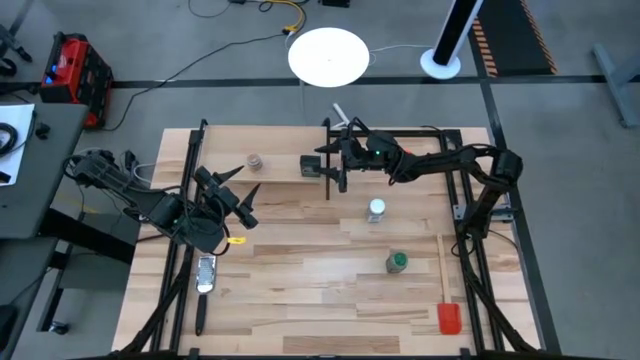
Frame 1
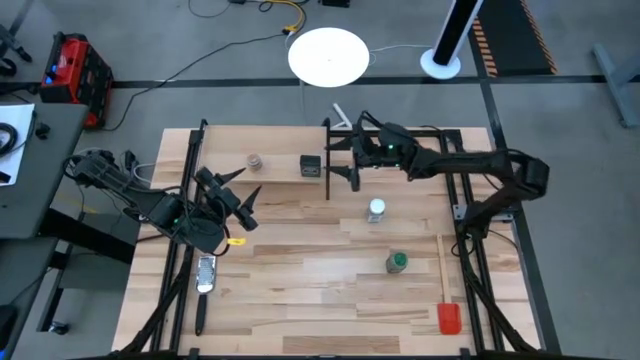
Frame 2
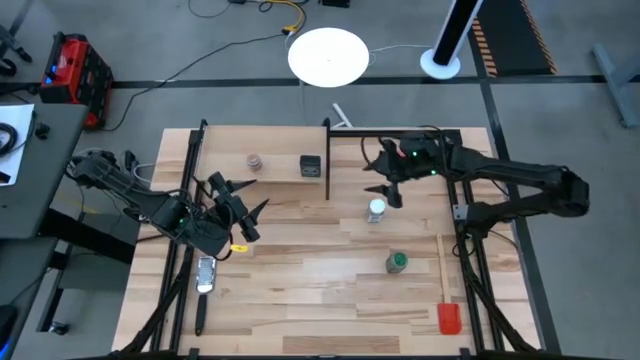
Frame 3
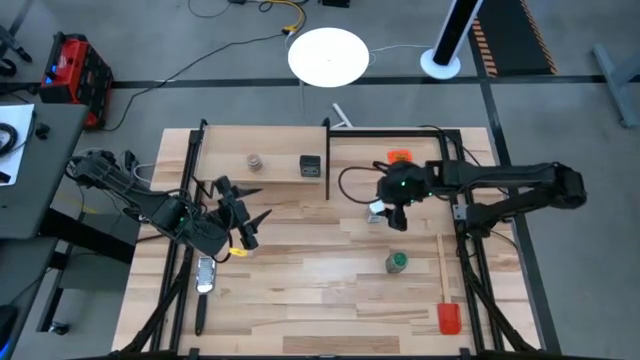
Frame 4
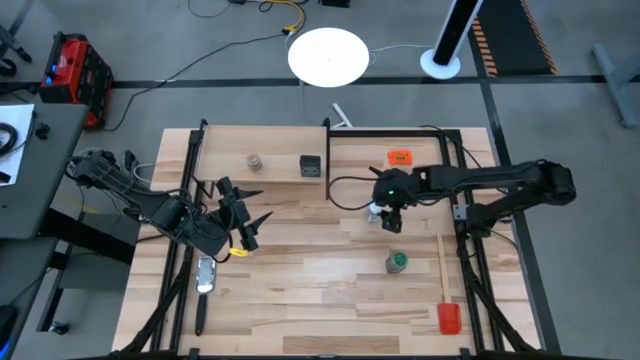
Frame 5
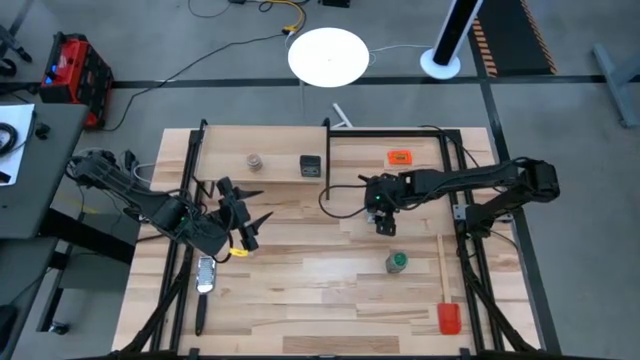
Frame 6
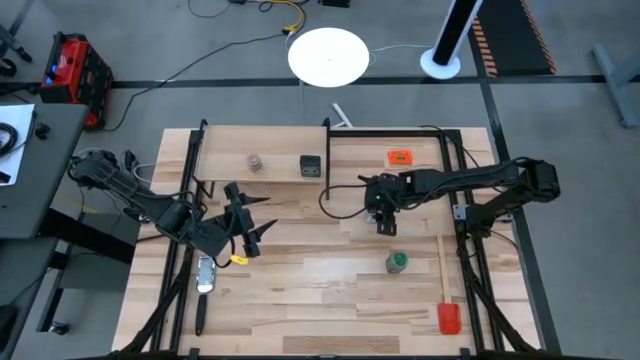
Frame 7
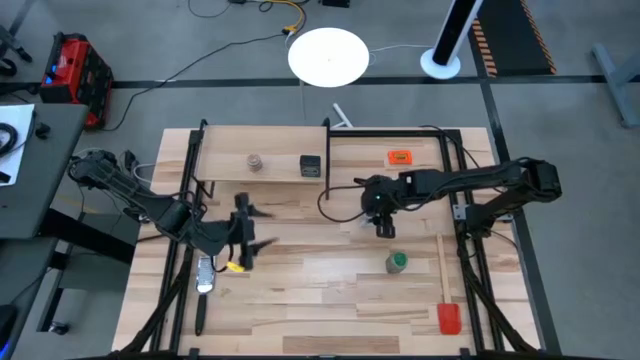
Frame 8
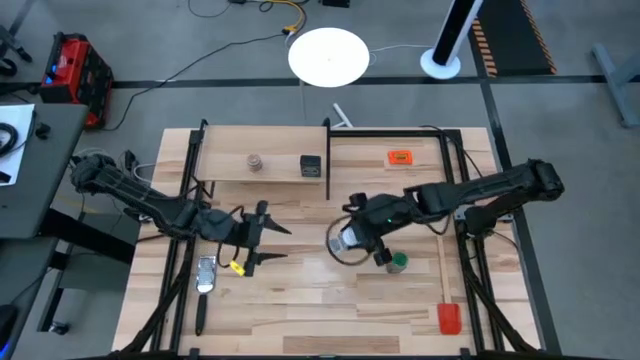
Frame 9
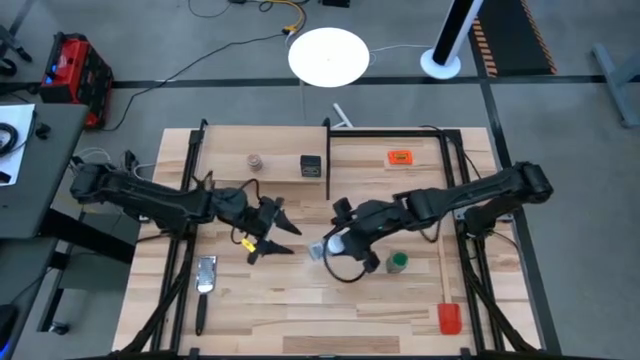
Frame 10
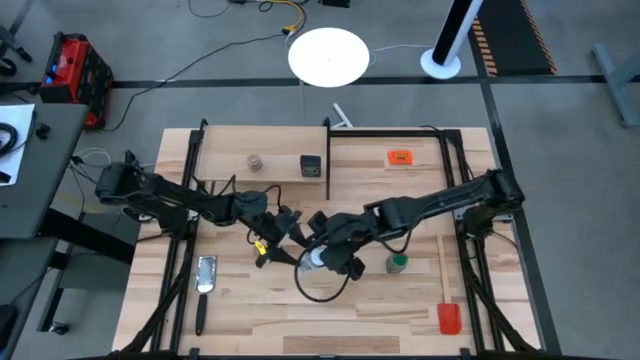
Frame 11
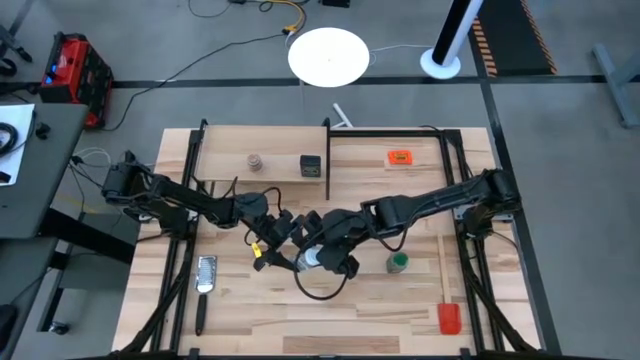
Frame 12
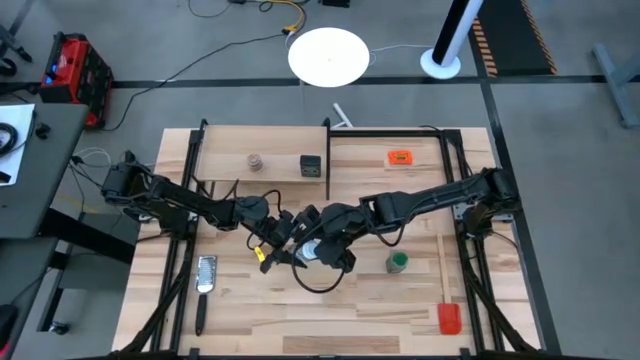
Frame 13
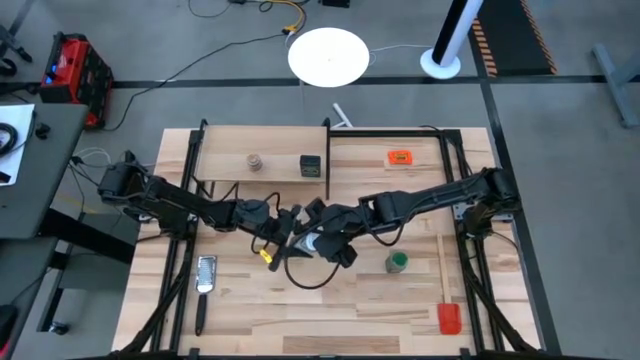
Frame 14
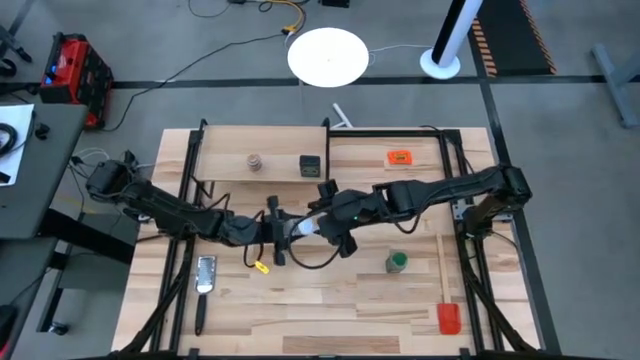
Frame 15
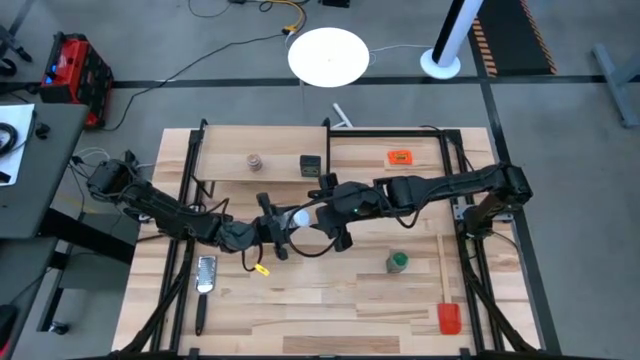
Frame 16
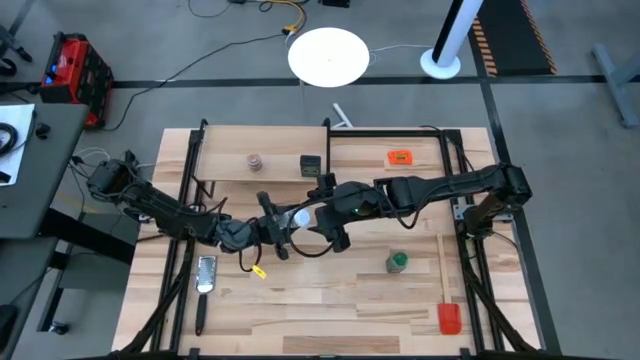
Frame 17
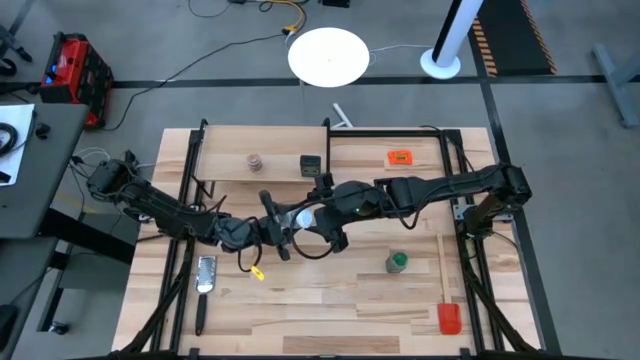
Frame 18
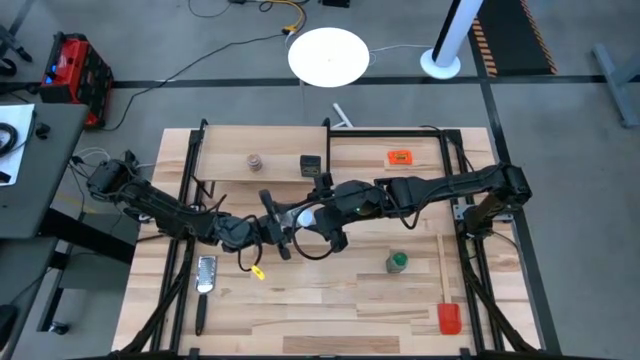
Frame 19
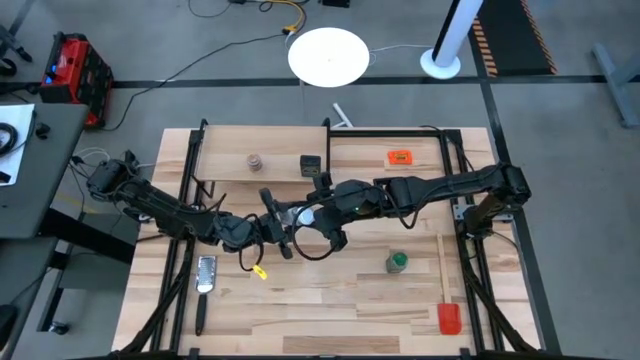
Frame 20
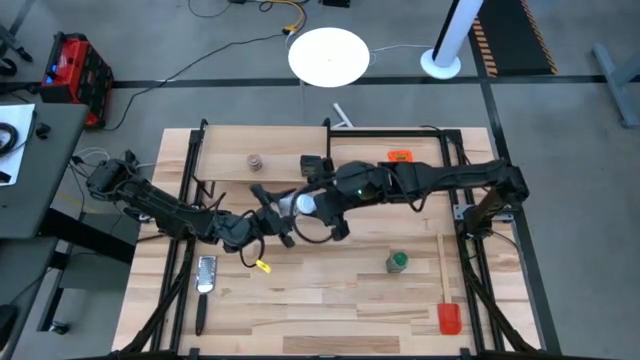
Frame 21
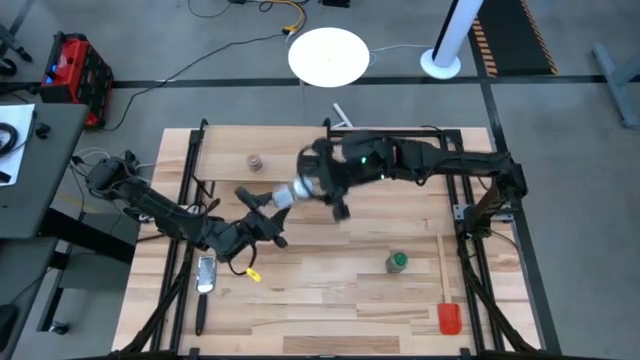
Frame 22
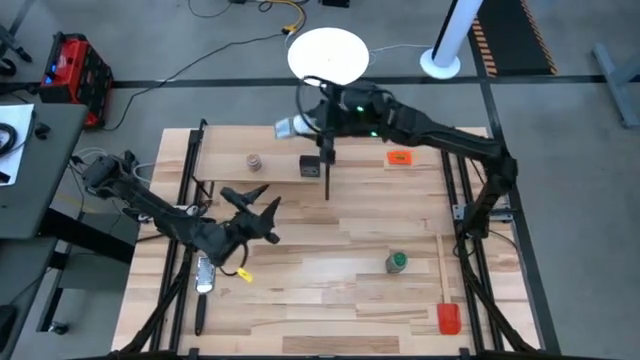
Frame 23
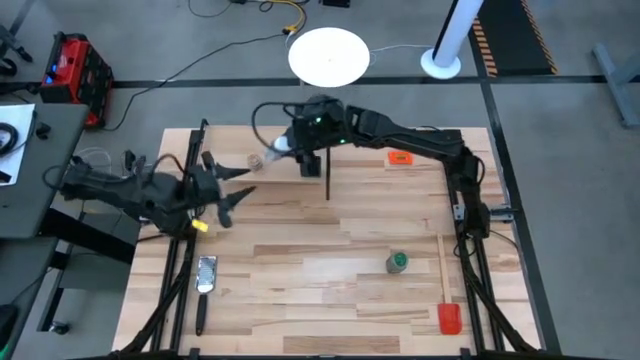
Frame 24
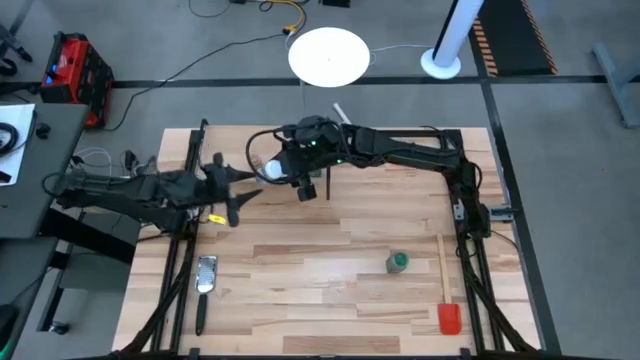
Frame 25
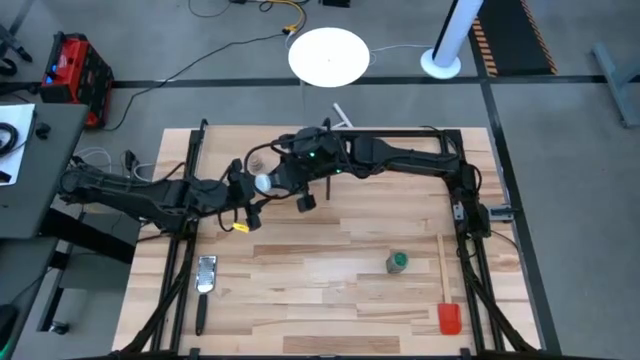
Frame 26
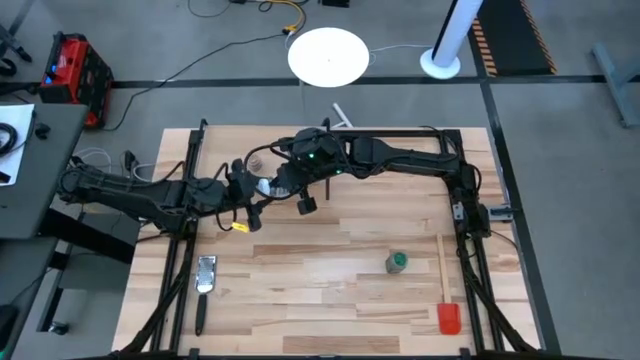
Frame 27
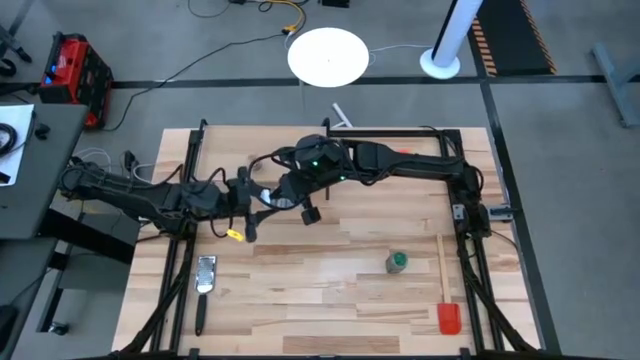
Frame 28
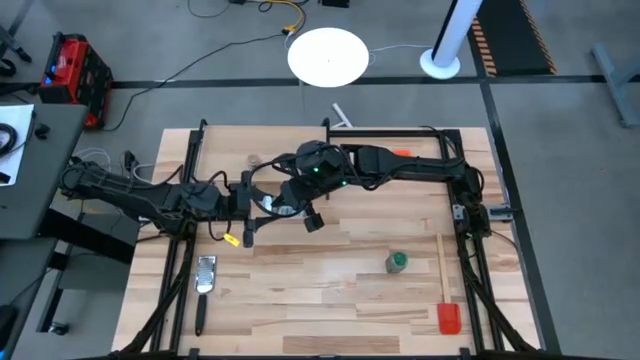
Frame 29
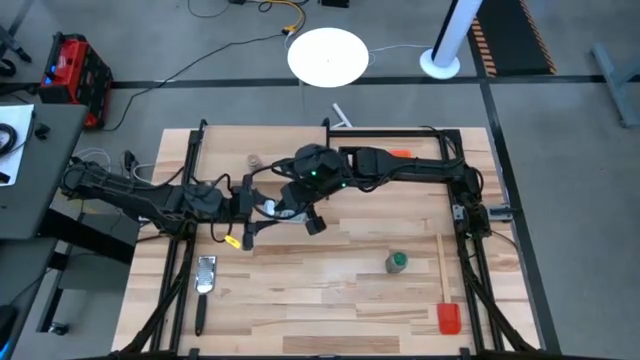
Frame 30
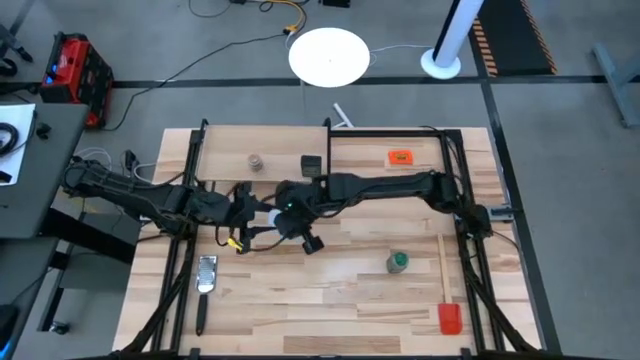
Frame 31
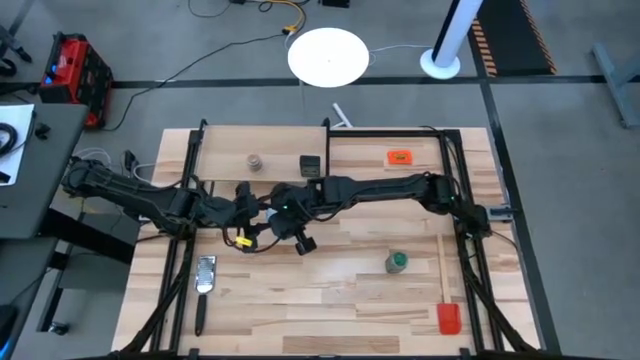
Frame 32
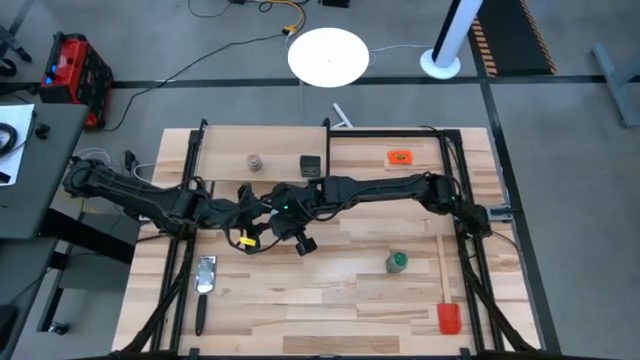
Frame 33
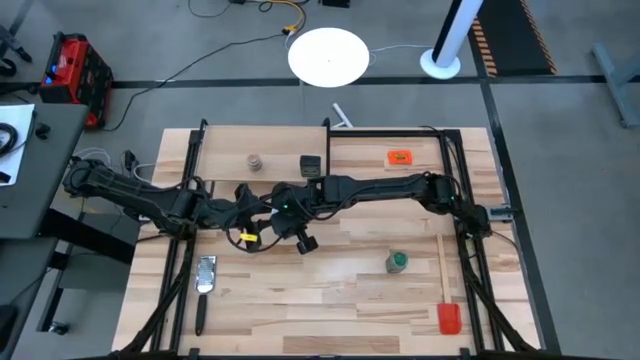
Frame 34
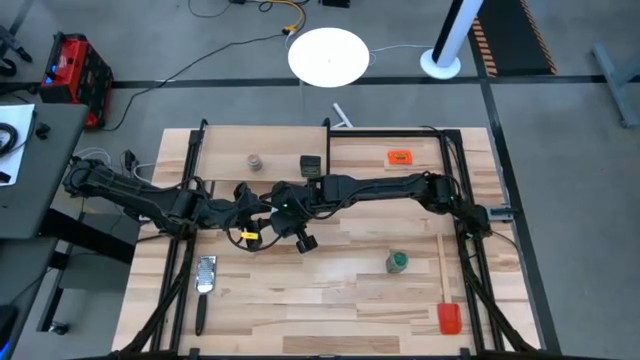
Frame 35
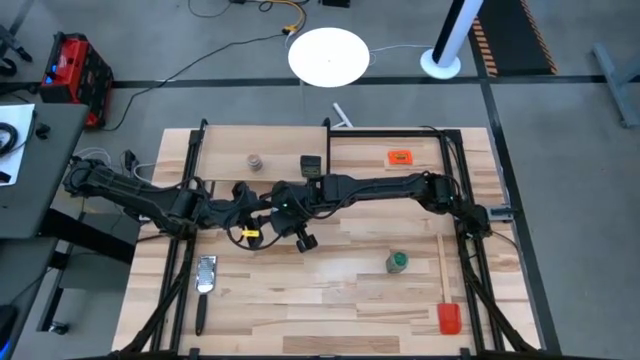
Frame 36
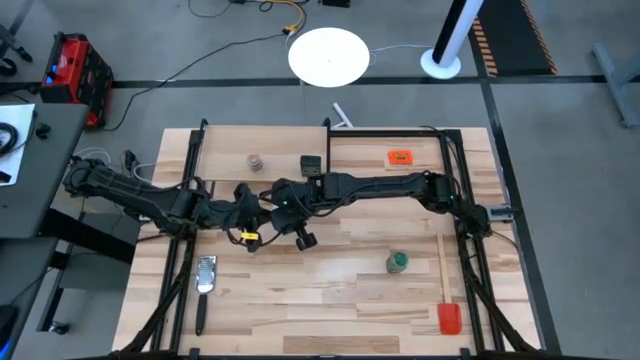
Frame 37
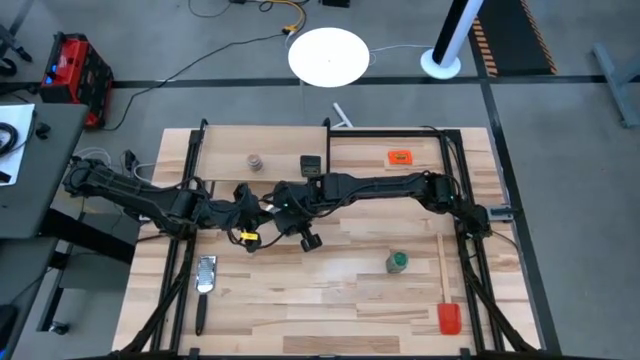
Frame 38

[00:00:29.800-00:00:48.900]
Task: Shelf spices
Put the white seasoning bottle on the shelf
